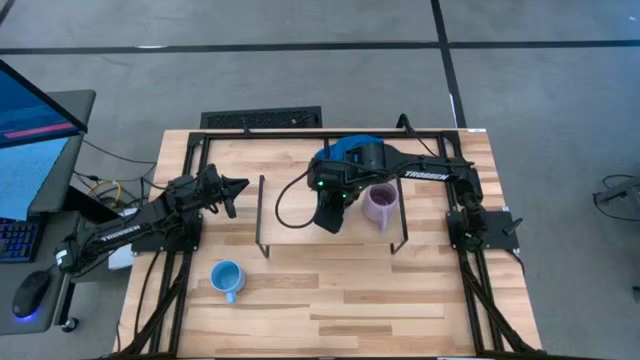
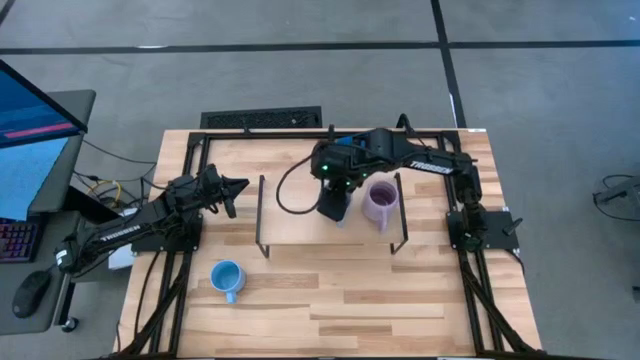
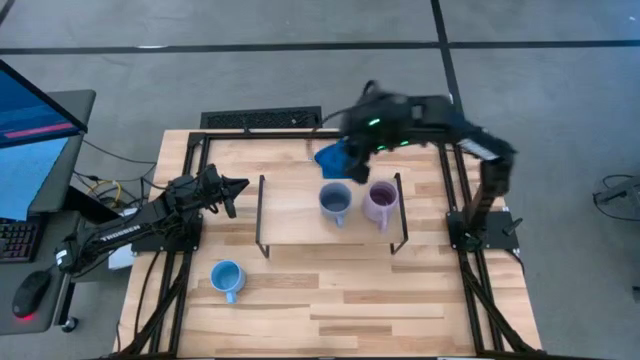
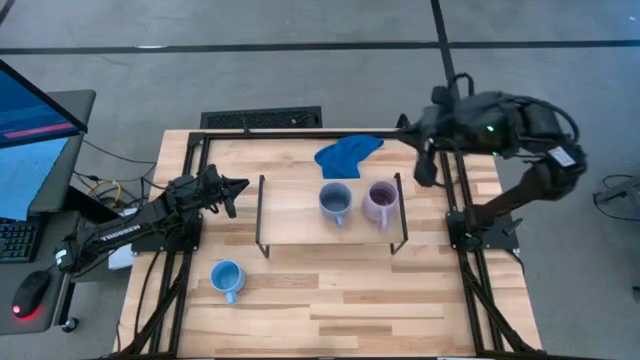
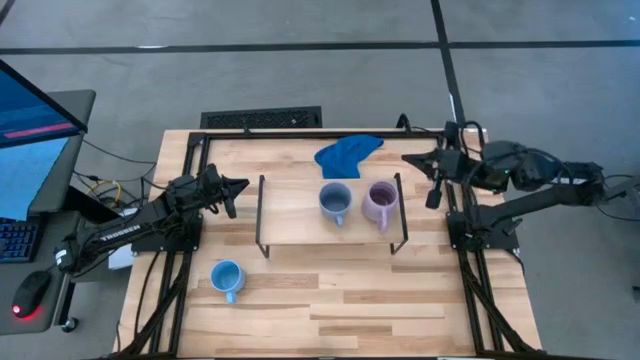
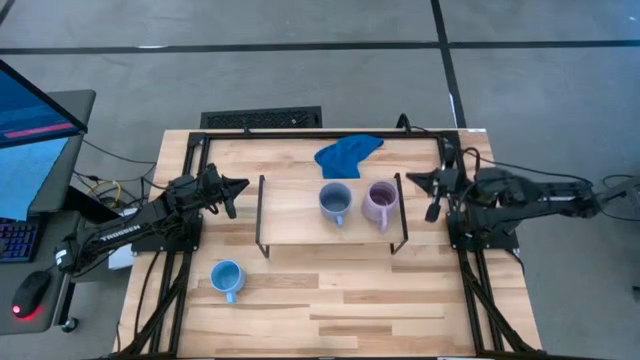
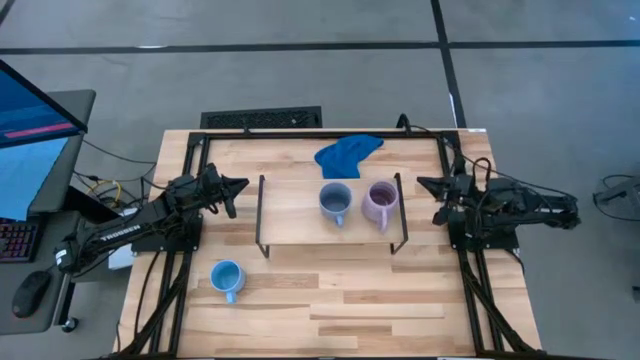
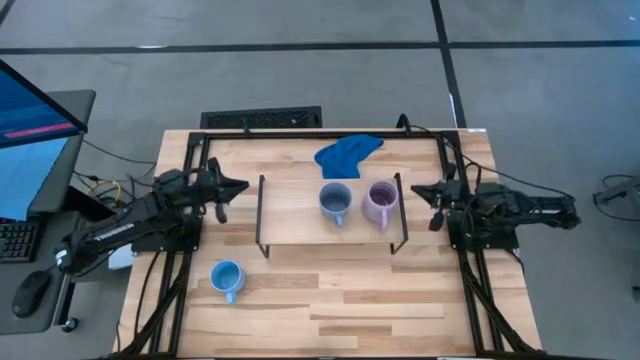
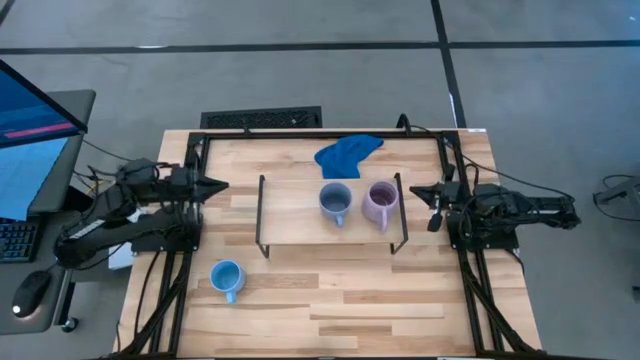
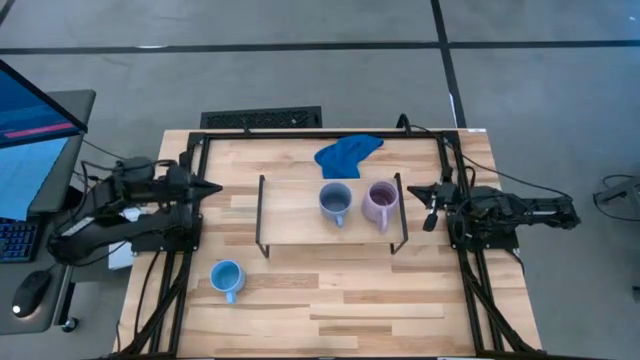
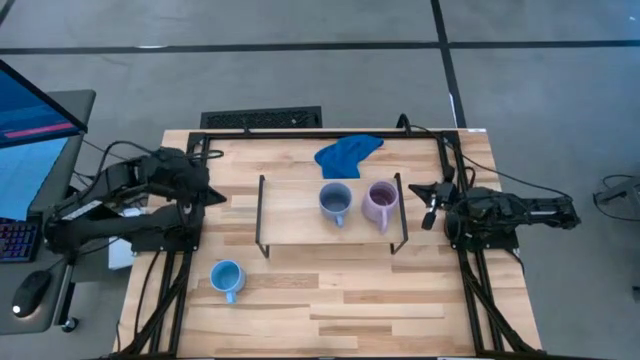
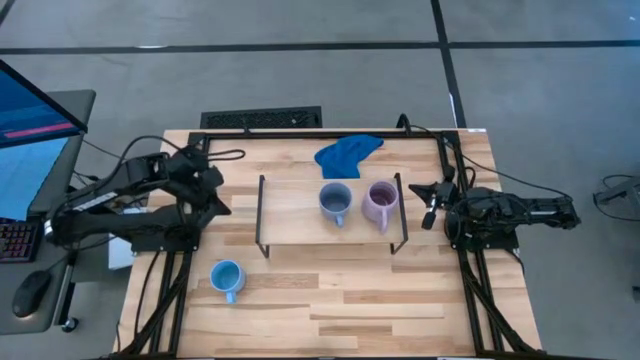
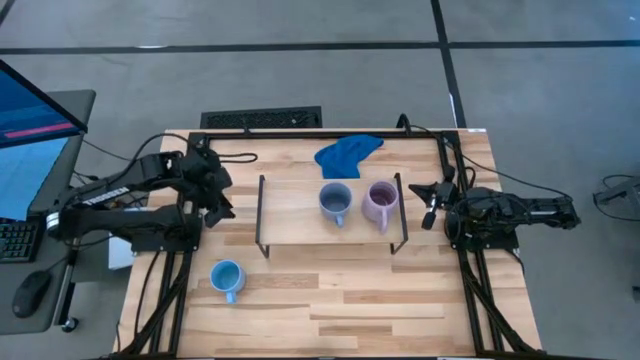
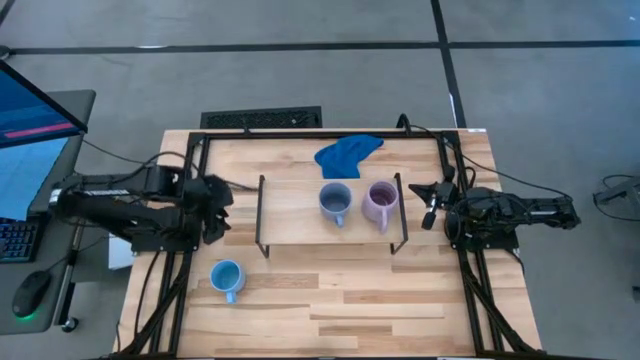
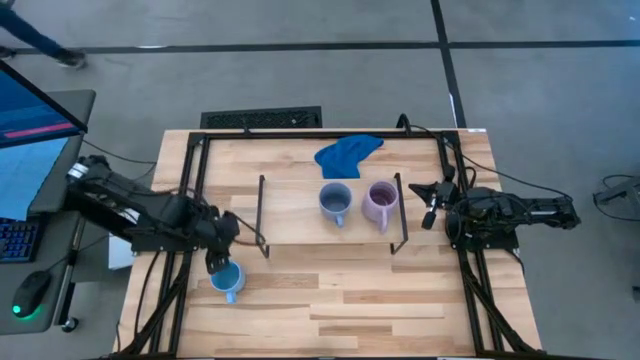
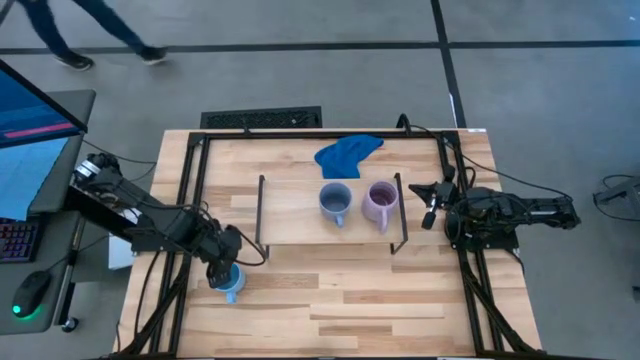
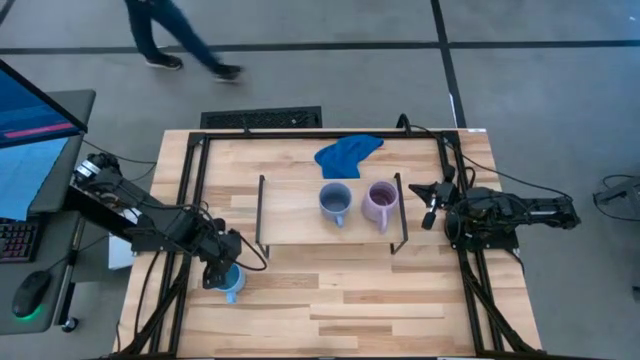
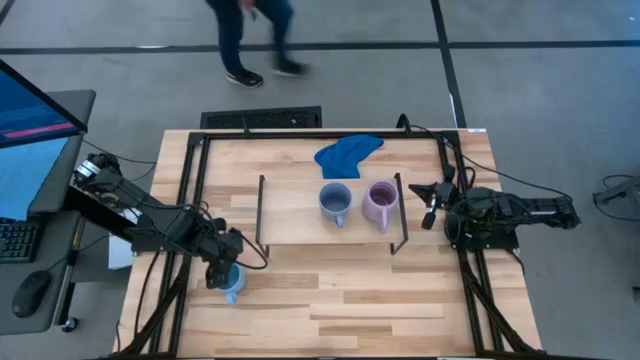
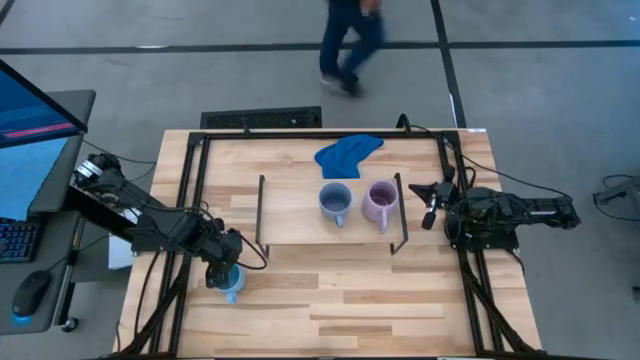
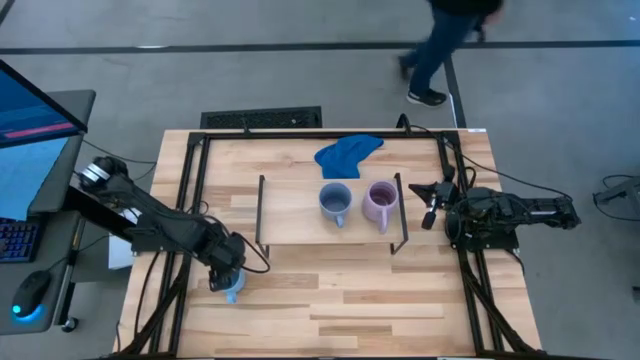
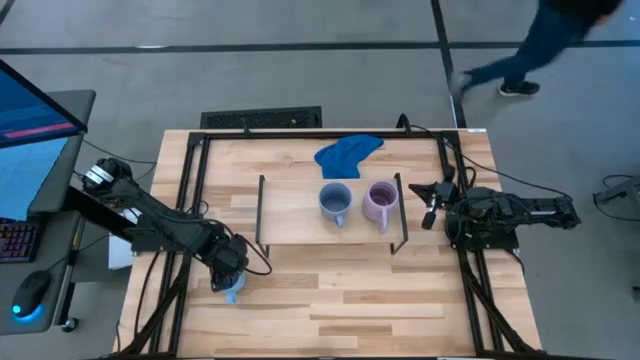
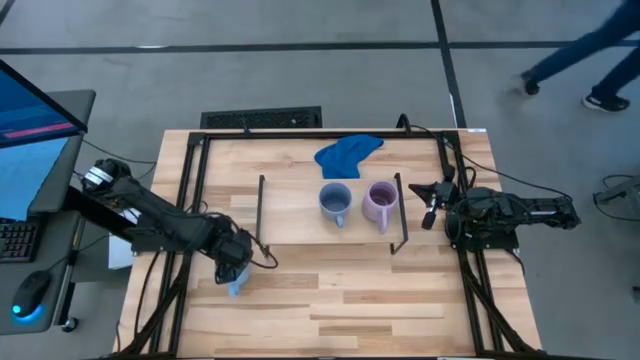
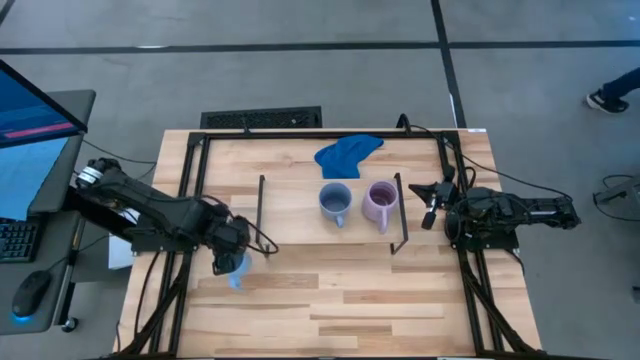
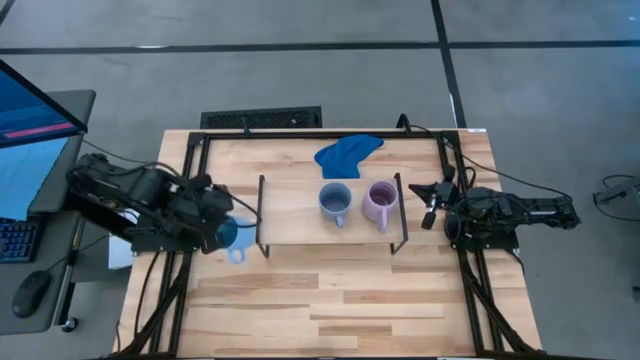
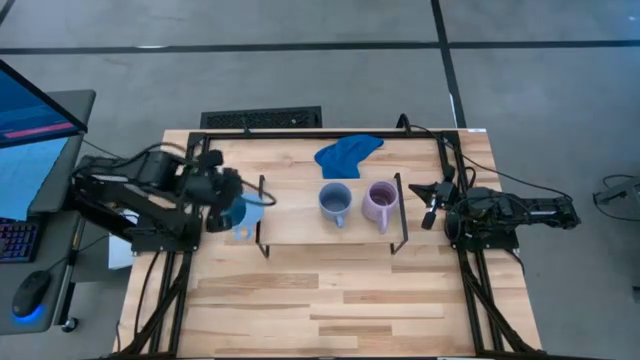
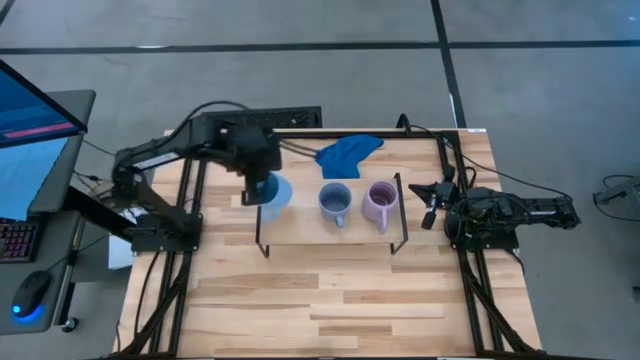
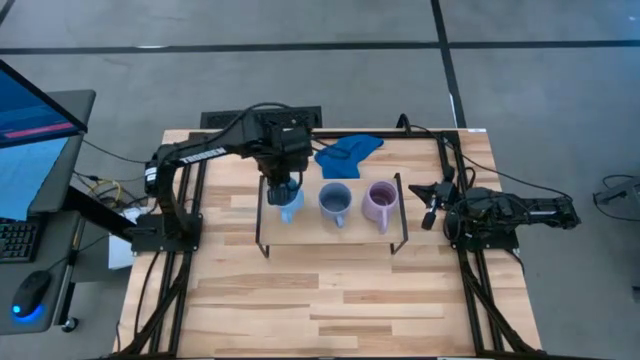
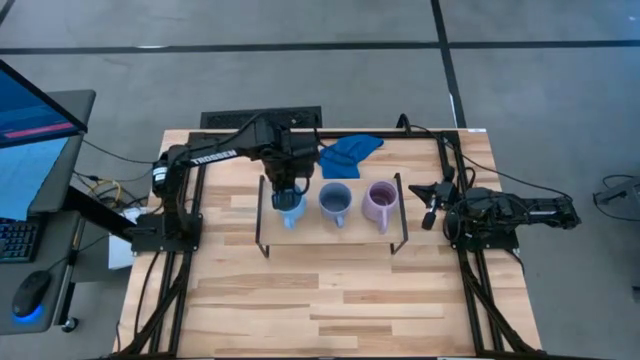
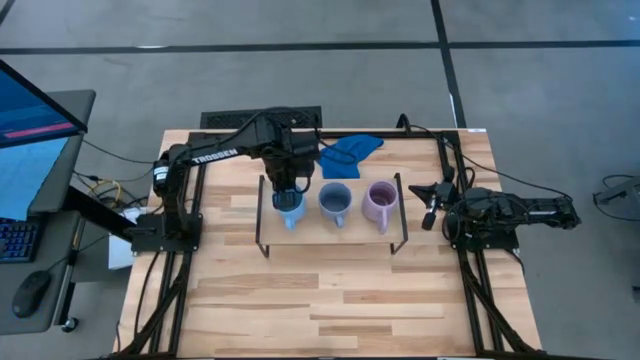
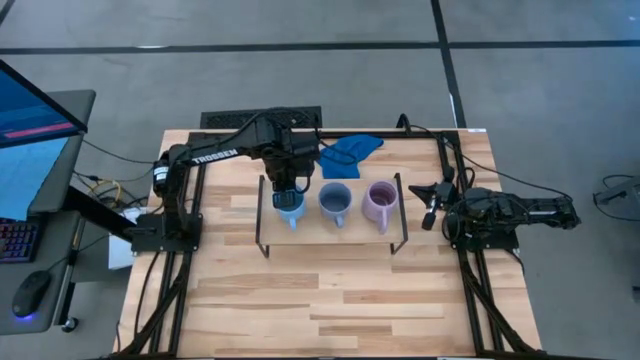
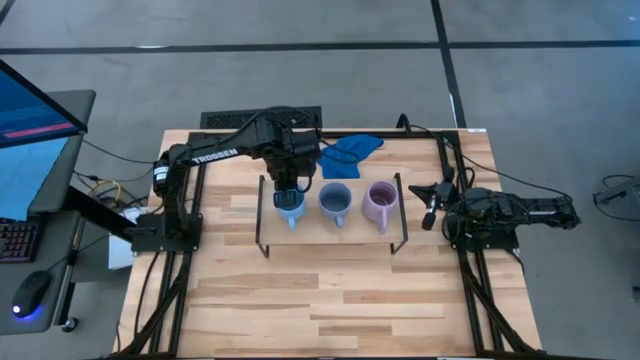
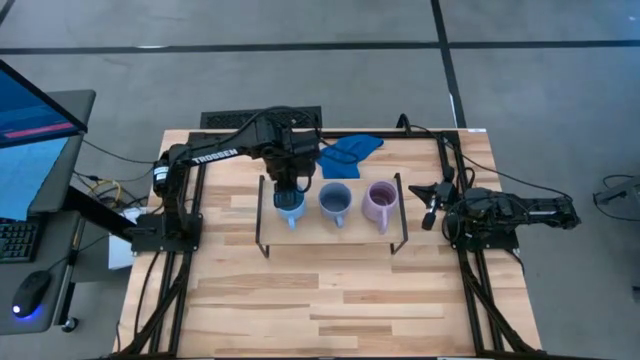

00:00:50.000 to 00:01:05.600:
Task: Stack small to large cups/mugs on shelf
Put the light blue mug on the shelf

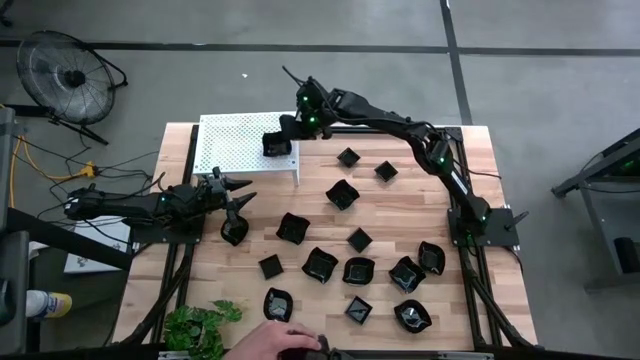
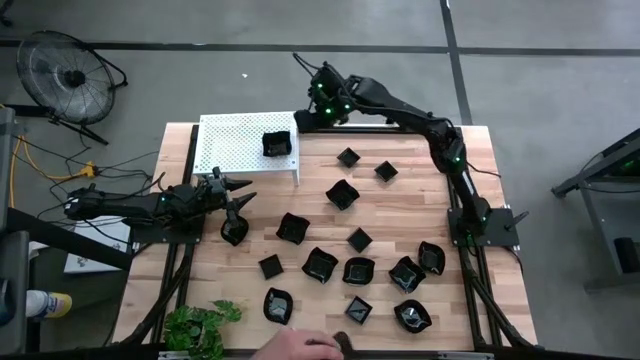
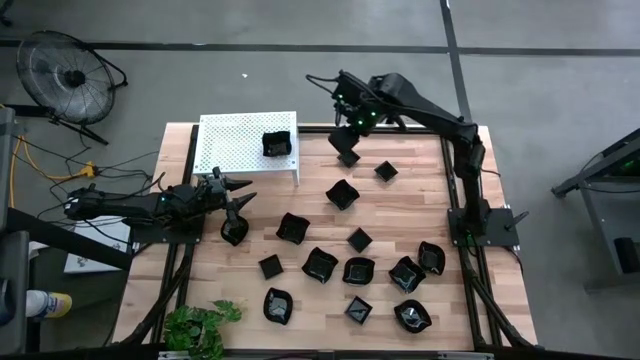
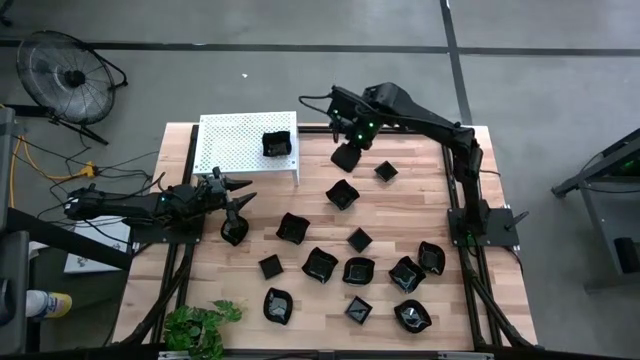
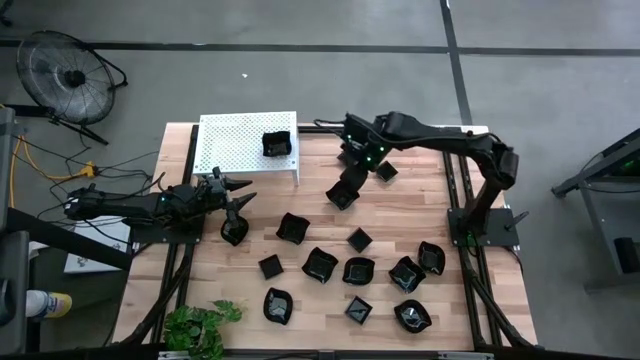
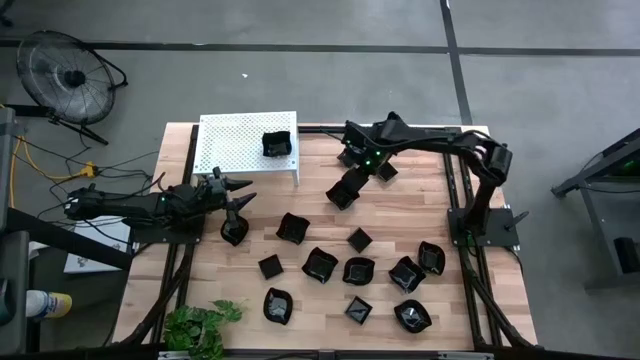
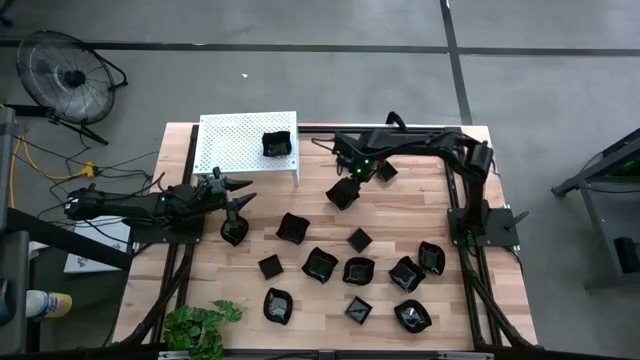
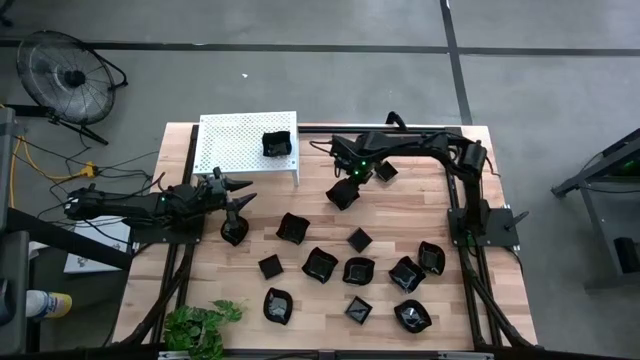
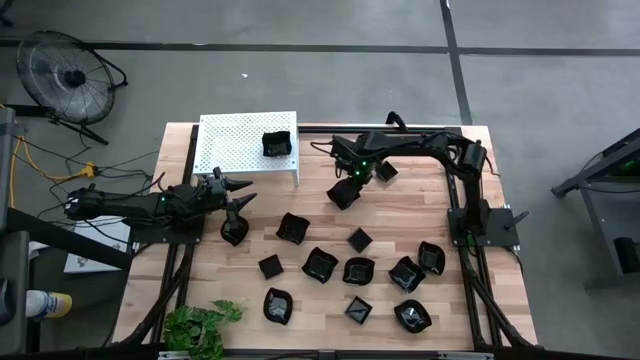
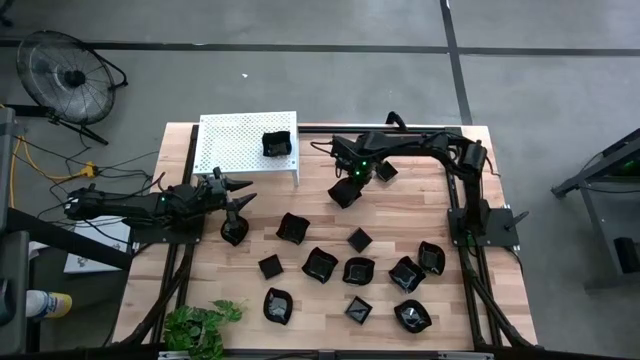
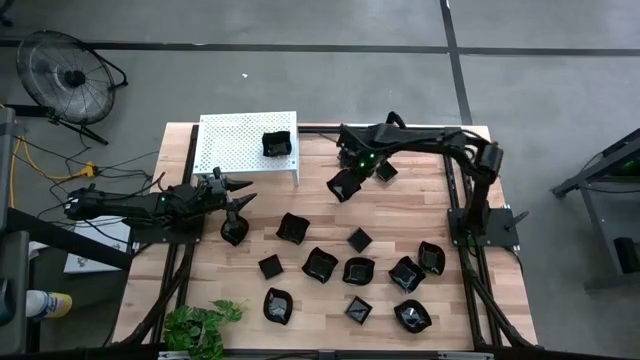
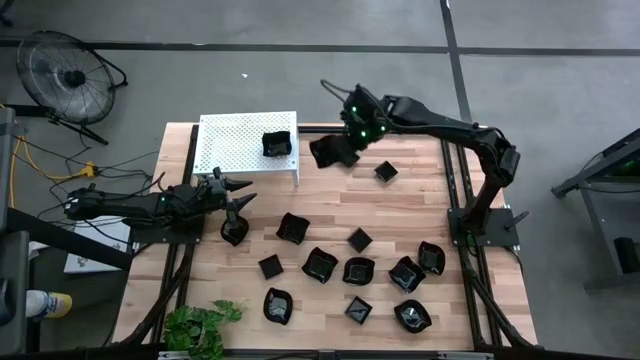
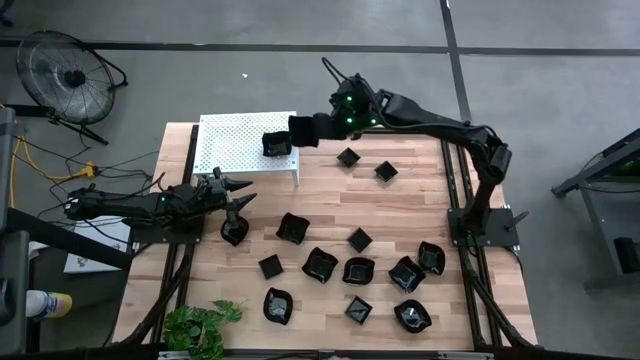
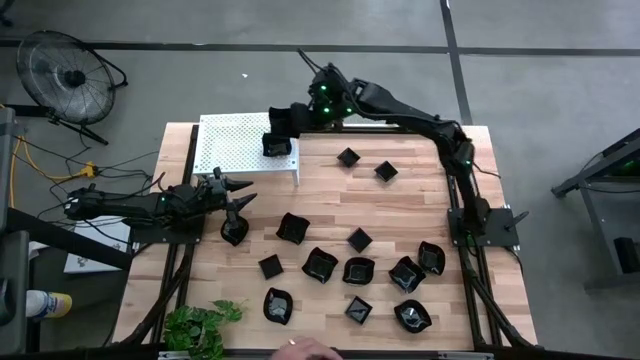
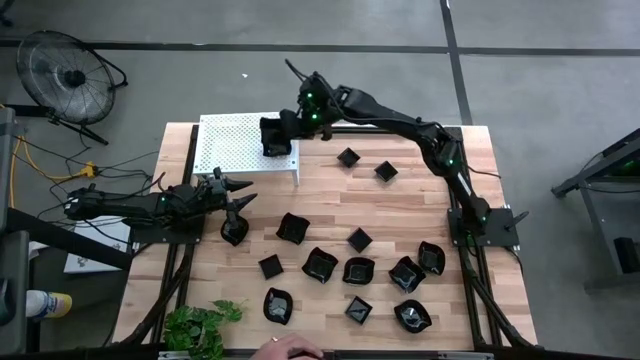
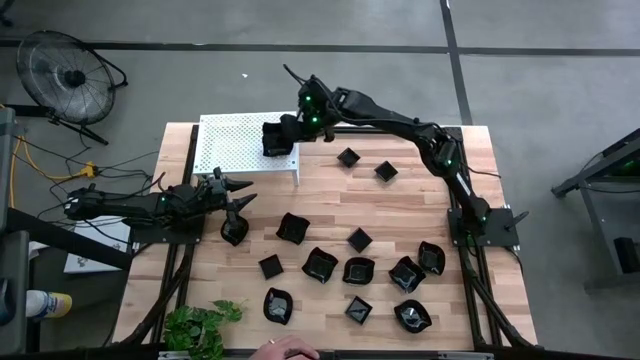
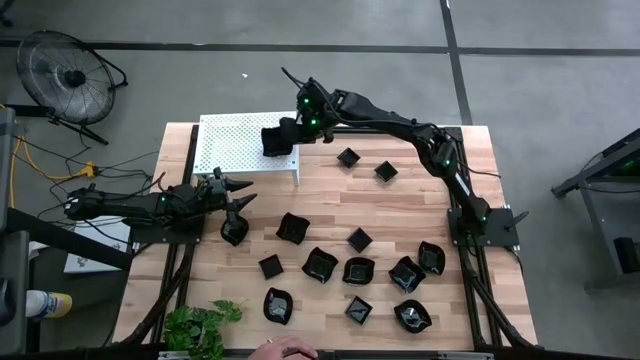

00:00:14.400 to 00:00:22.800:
Task: Pick & Place Mini shaped plates
Stack the black distorted square plate on top of the black distorted square plate on the shelf
